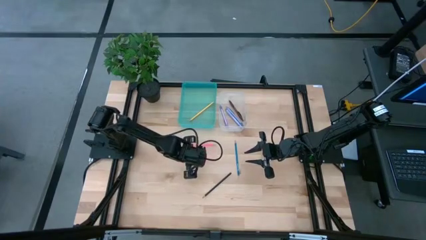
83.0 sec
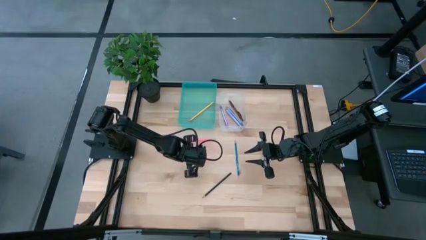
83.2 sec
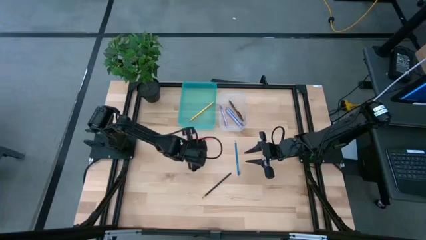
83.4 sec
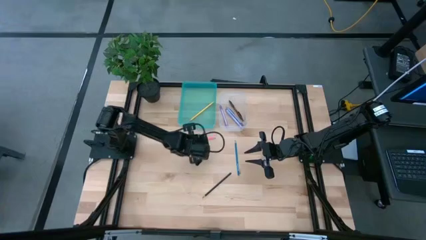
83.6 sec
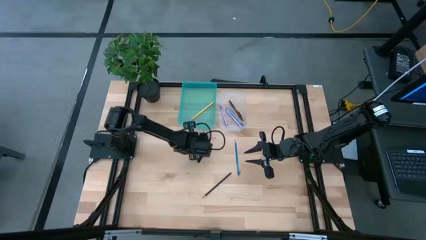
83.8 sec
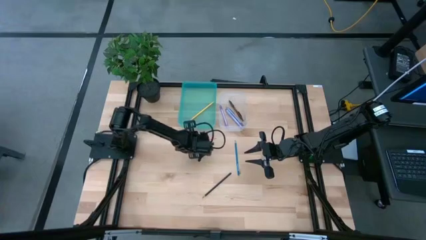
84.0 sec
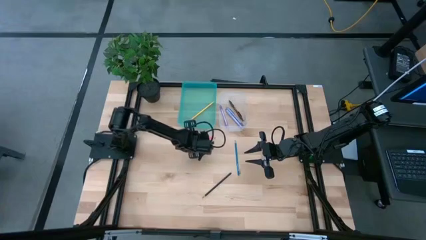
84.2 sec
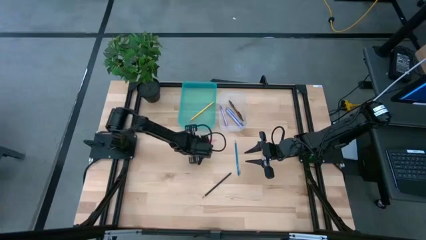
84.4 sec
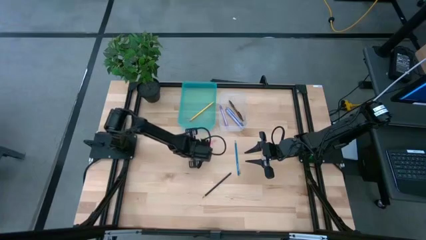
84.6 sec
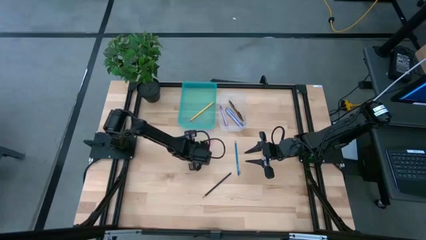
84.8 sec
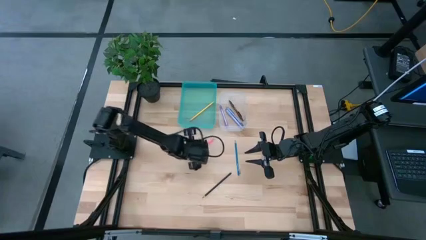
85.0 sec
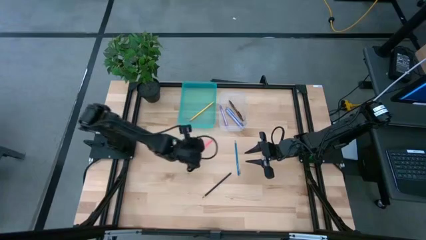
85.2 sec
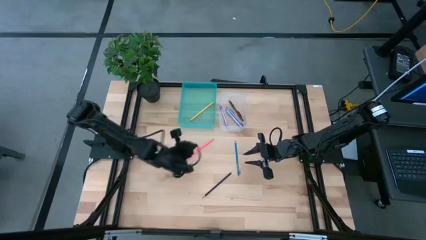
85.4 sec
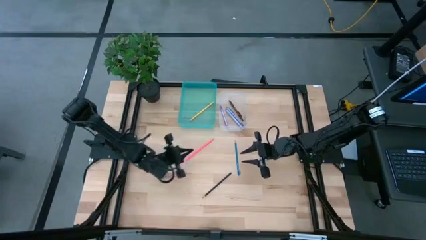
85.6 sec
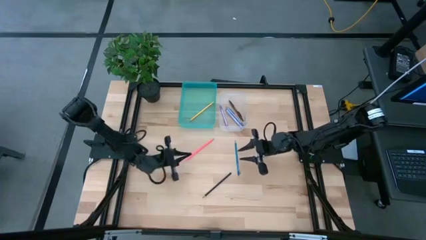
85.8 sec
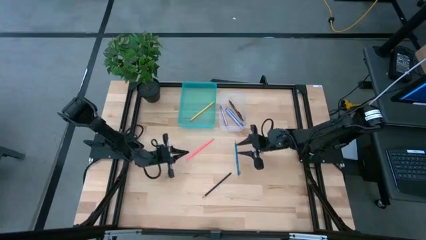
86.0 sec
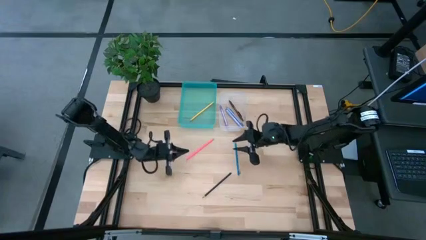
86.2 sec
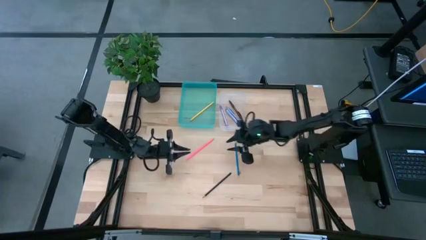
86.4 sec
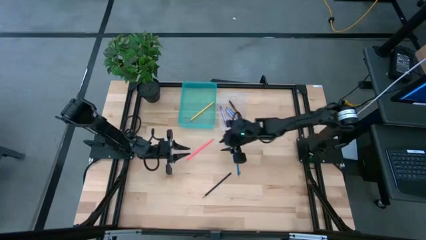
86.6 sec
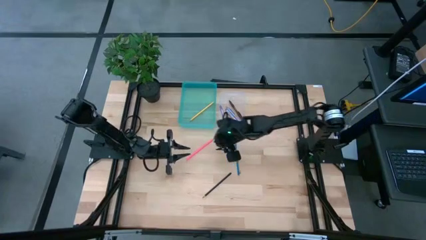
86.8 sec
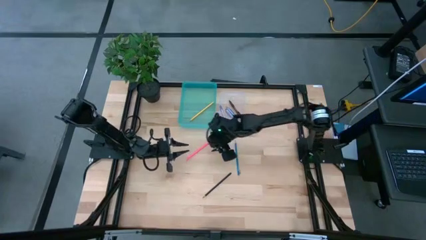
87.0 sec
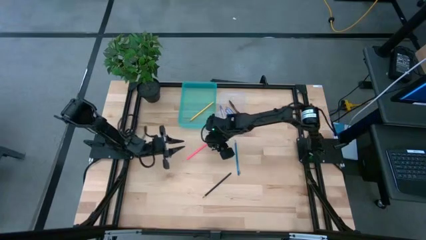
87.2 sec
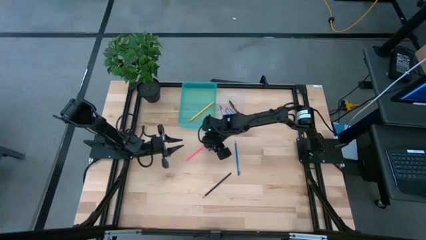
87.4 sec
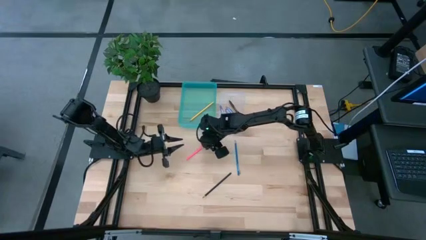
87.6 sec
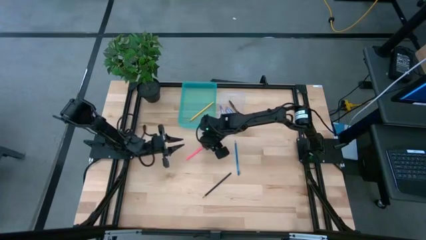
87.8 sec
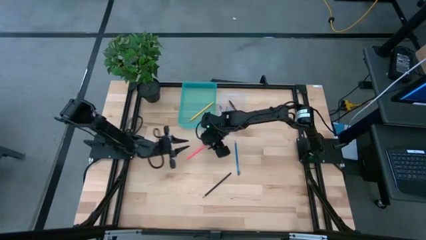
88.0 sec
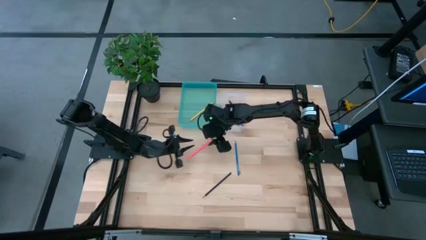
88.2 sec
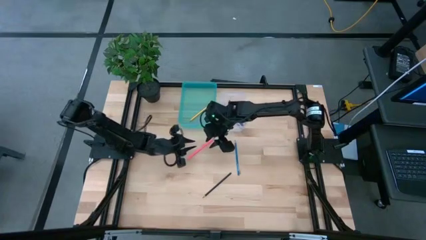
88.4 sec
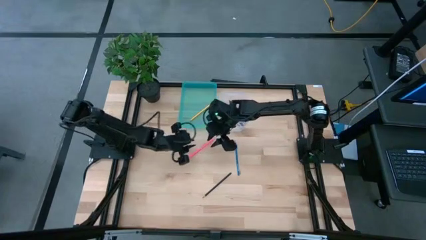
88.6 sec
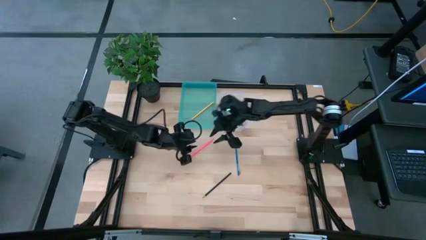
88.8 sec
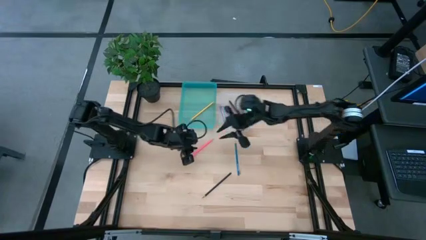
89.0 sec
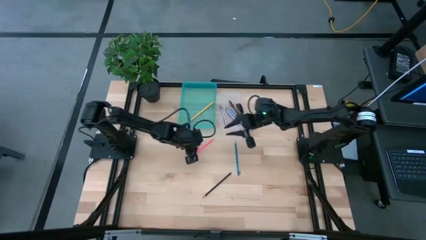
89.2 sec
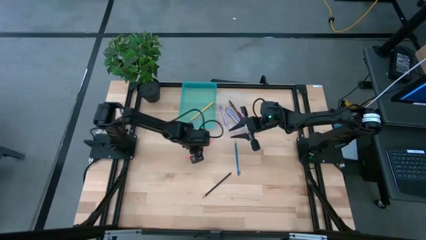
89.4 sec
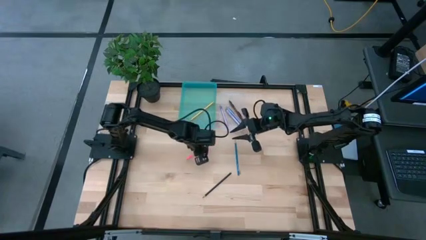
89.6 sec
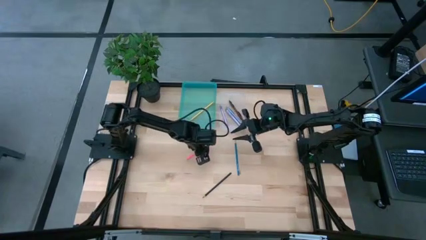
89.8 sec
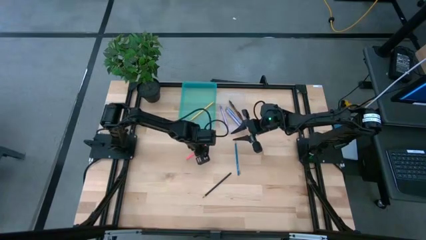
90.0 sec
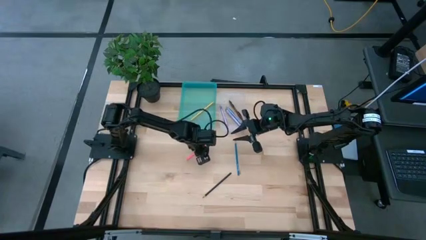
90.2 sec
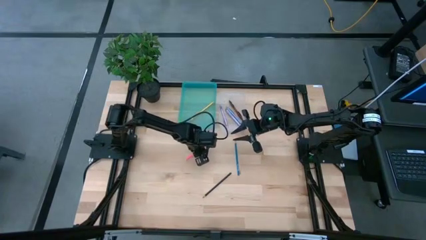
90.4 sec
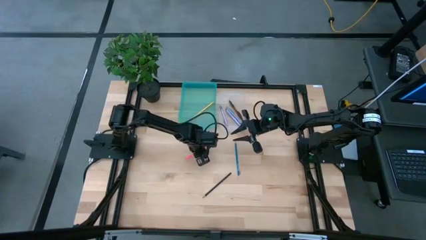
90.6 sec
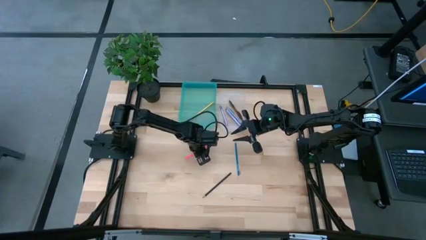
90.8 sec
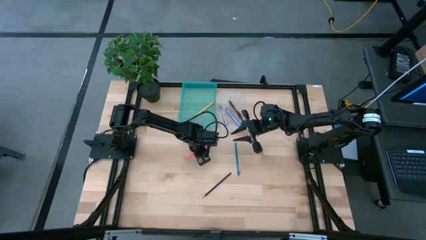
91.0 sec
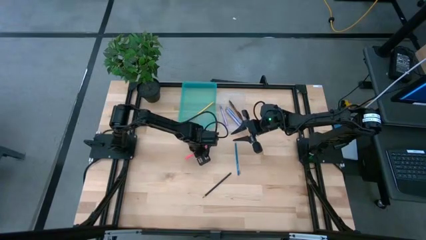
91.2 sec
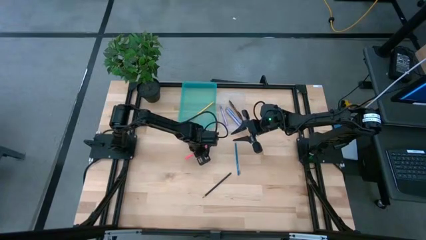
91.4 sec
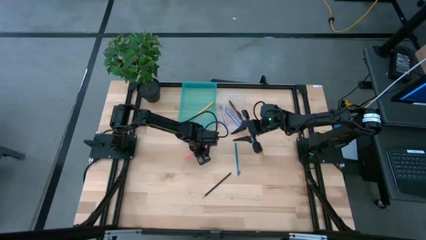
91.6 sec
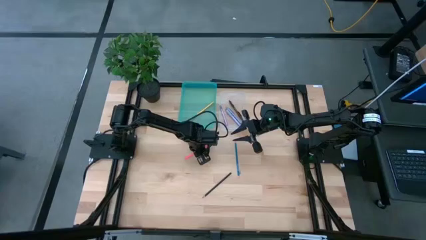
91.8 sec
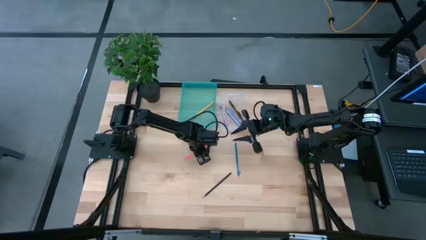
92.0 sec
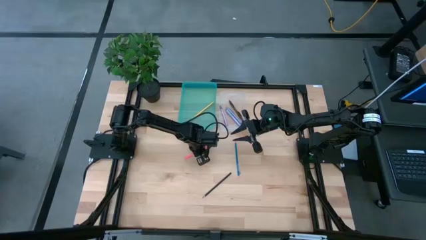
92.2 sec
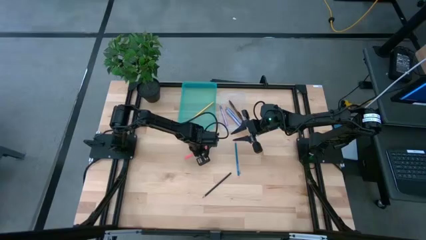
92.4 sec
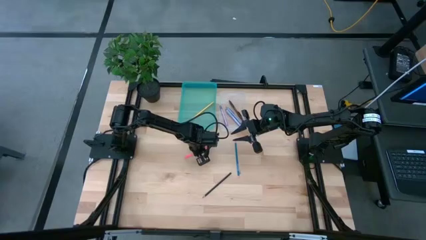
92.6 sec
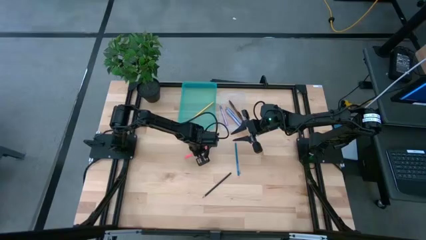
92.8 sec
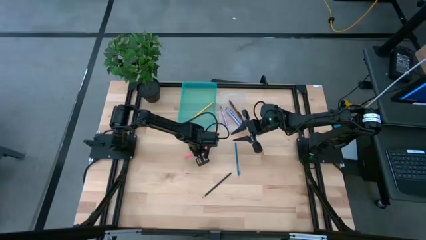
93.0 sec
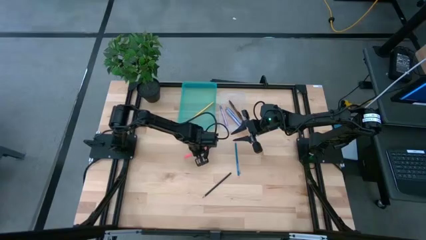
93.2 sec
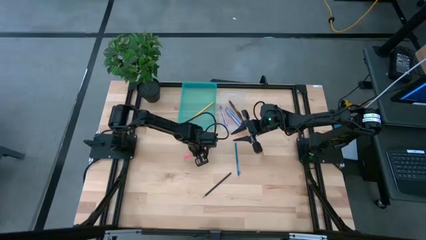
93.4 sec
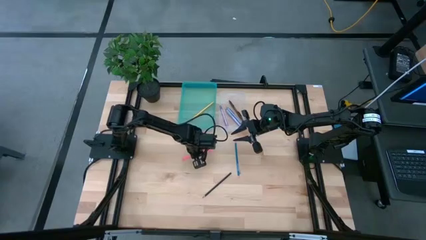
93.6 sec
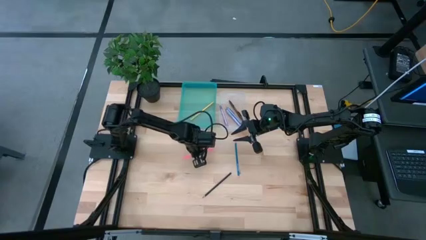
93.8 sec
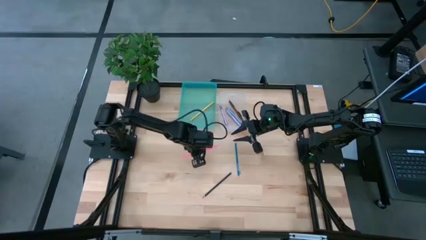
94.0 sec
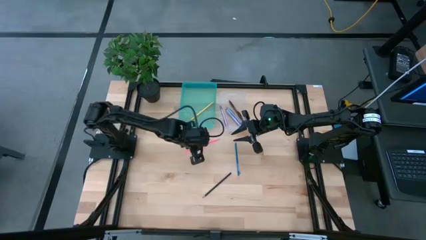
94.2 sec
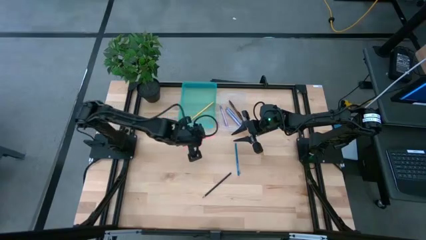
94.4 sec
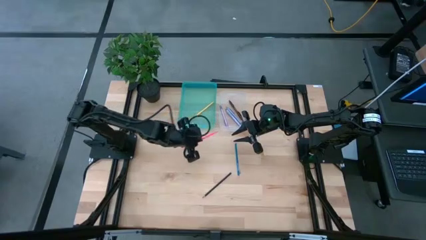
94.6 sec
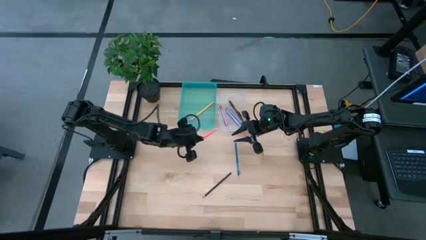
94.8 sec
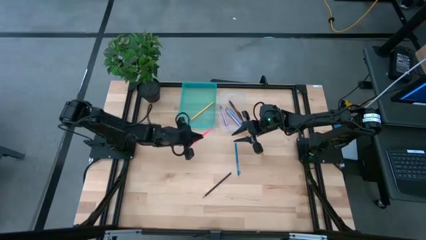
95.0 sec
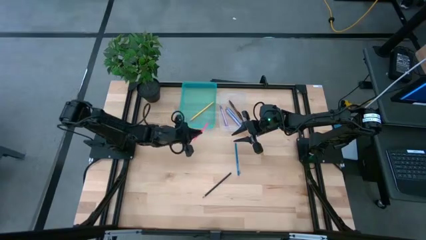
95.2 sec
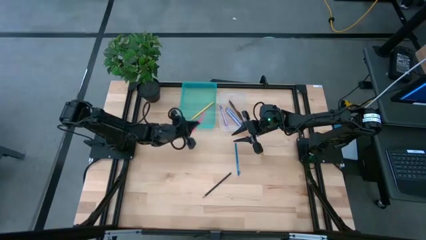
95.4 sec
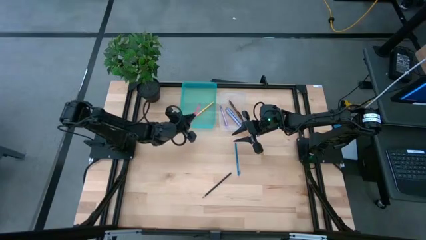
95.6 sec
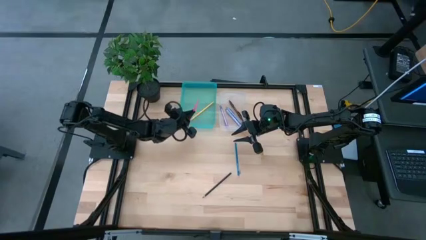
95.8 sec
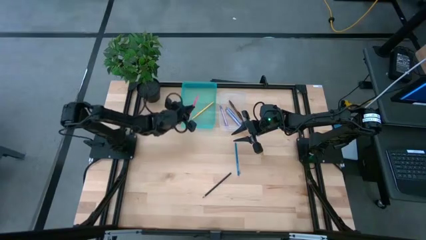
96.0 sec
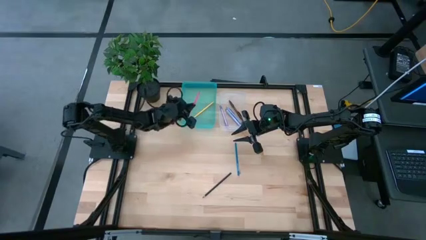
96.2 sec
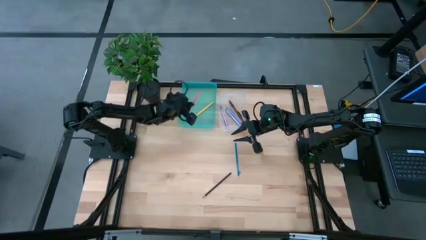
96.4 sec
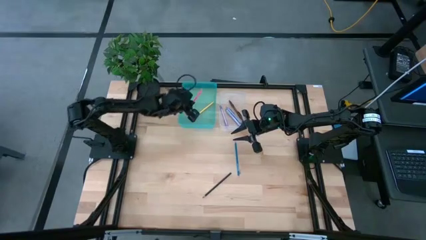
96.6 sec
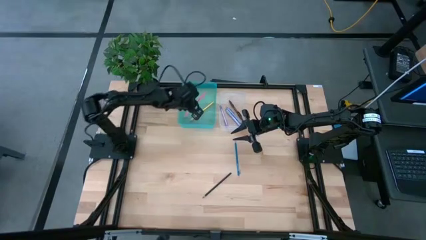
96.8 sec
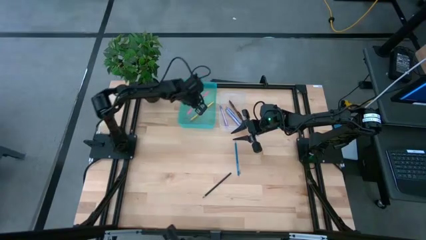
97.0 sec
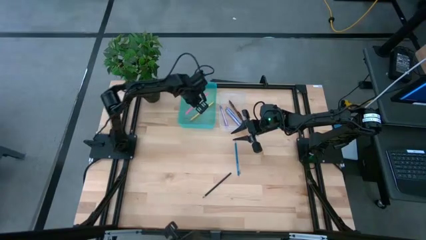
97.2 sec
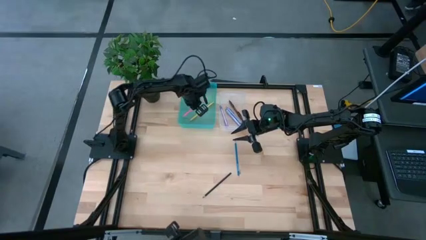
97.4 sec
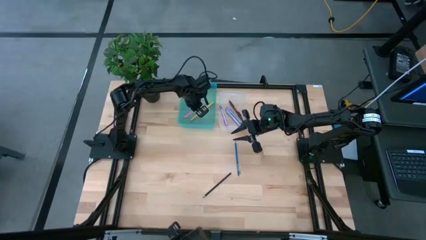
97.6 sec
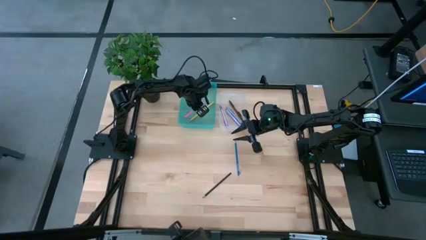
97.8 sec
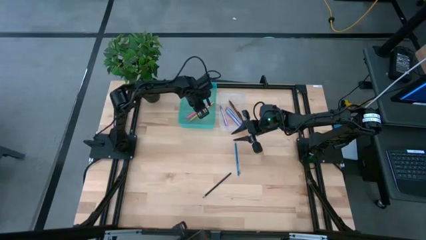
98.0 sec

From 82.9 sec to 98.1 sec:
Task: Sort pens & pencils
Put the pink pencil into the blue bin

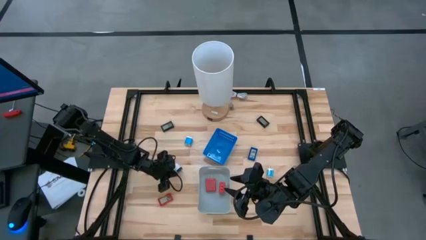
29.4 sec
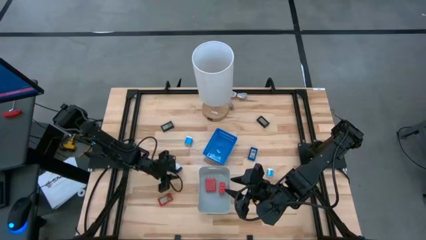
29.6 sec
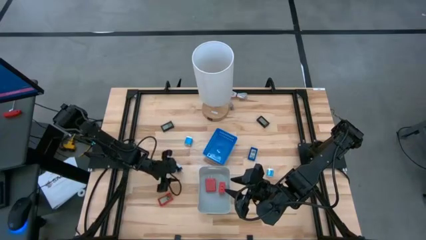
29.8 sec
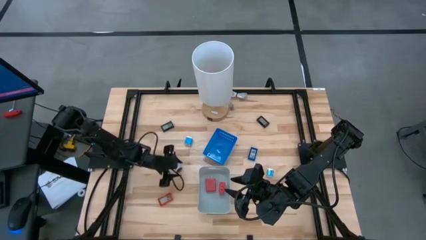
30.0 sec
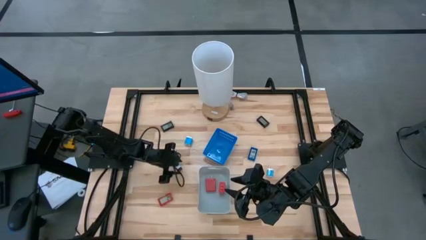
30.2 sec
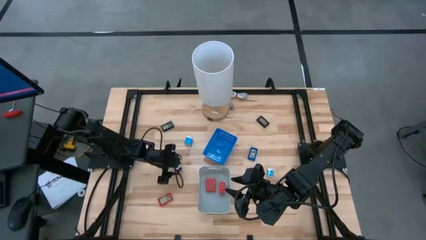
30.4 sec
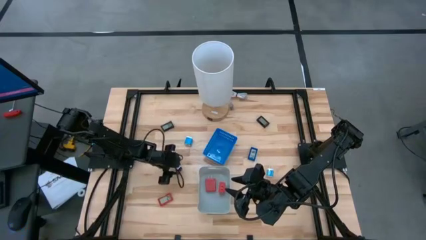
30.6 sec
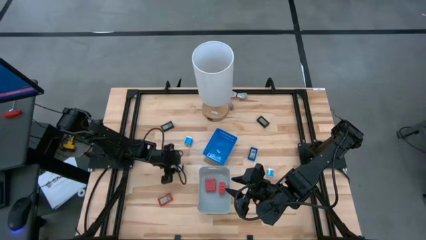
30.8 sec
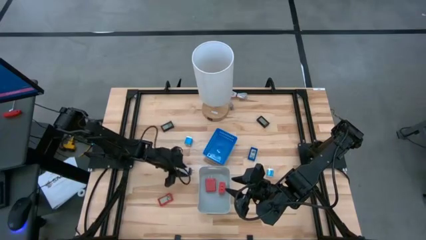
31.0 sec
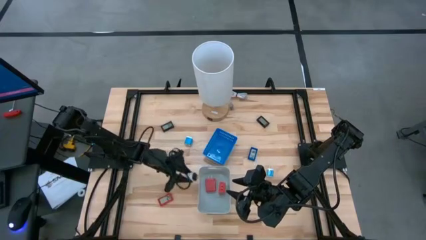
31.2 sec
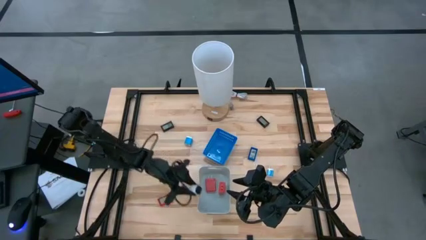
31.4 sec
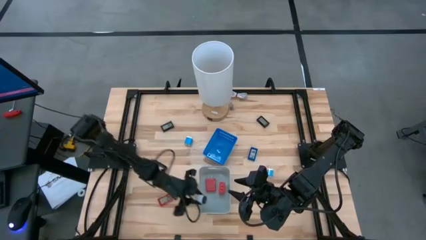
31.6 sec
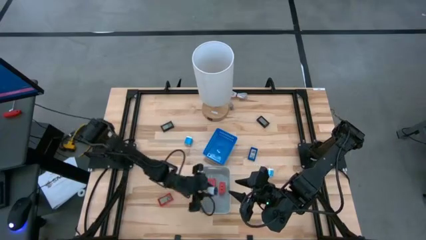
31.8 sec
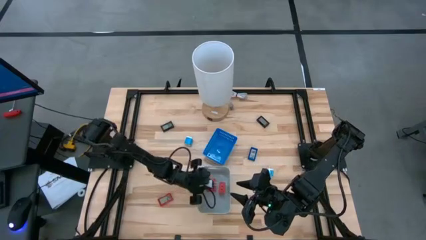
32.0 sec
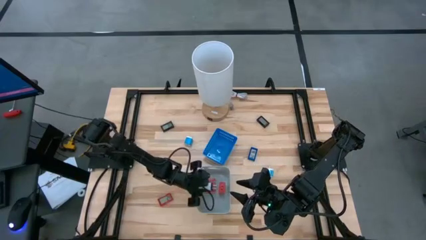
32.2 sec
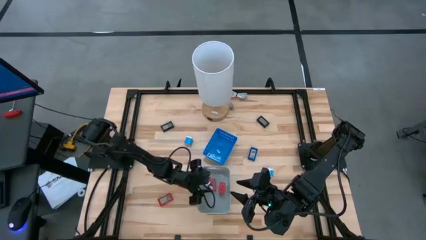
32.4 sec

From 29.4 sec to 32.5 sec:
Task: Pick & Place Office items
Put the white charger adapter into the gray bin
